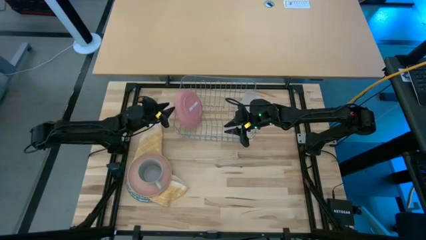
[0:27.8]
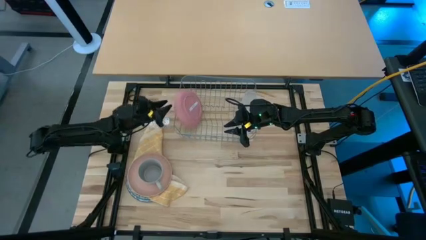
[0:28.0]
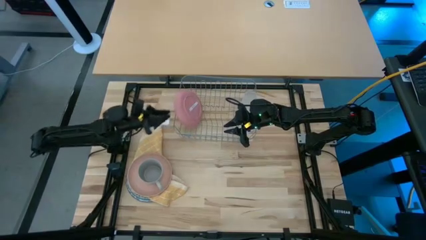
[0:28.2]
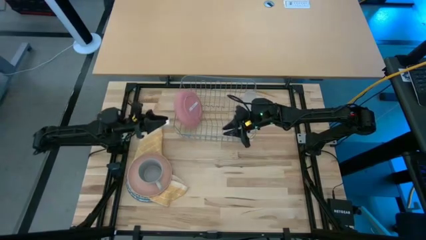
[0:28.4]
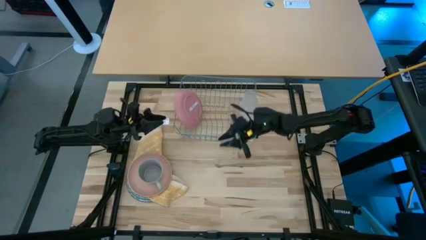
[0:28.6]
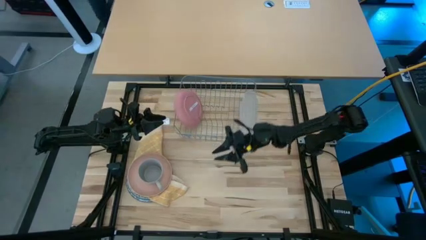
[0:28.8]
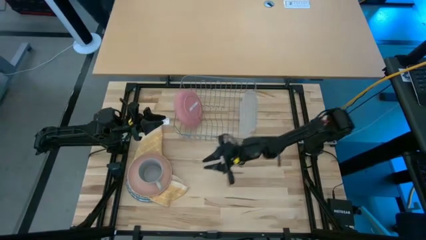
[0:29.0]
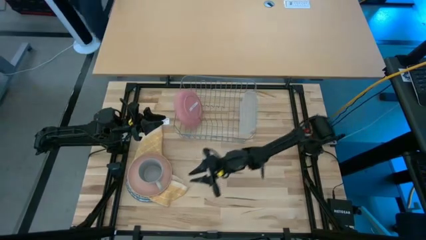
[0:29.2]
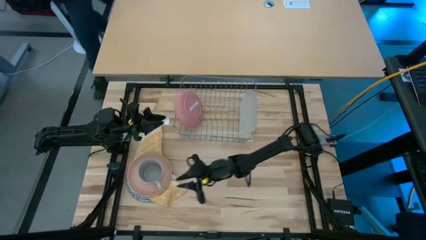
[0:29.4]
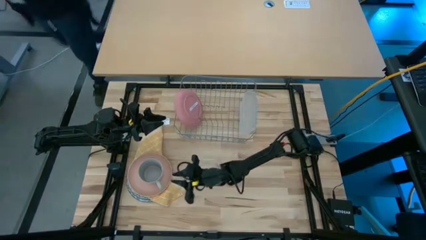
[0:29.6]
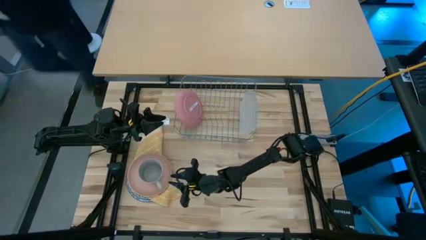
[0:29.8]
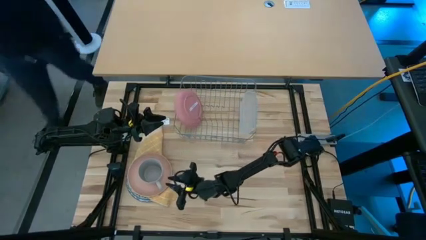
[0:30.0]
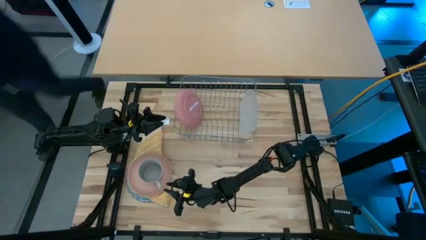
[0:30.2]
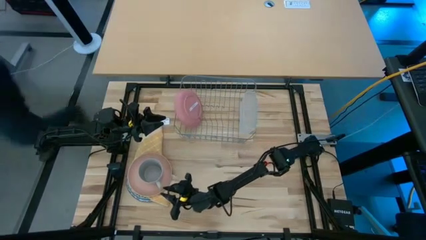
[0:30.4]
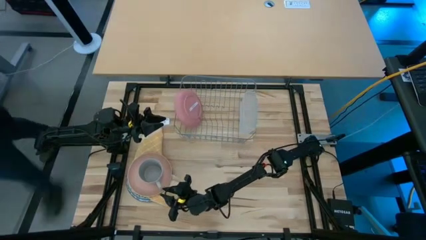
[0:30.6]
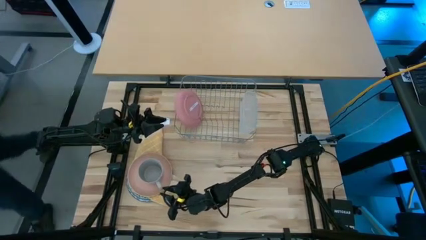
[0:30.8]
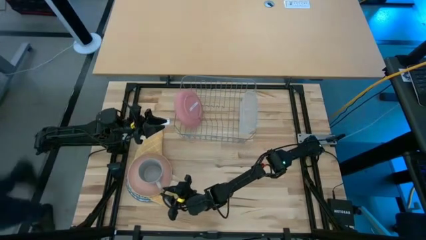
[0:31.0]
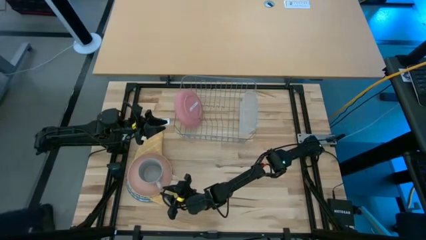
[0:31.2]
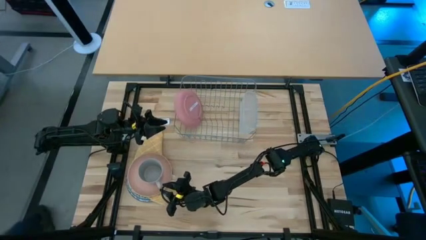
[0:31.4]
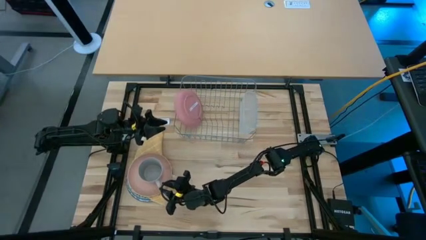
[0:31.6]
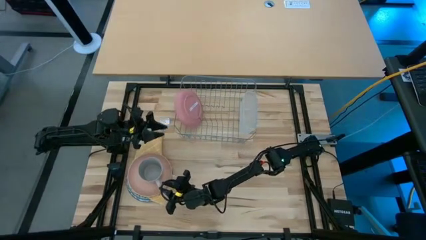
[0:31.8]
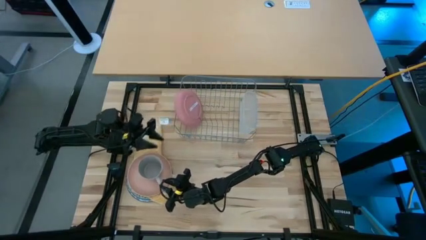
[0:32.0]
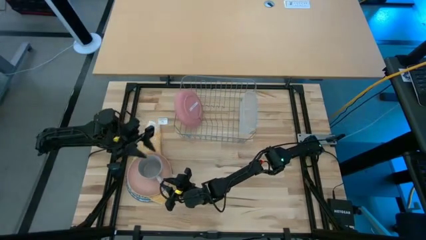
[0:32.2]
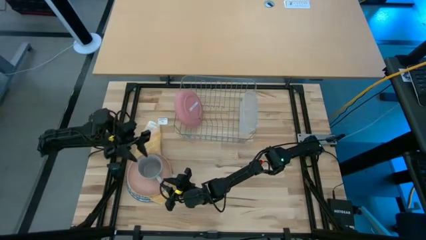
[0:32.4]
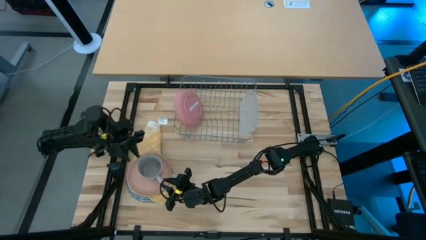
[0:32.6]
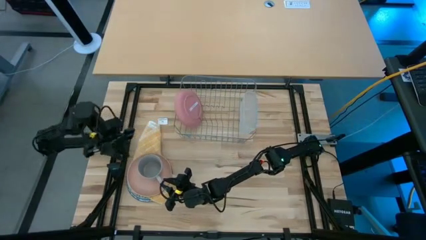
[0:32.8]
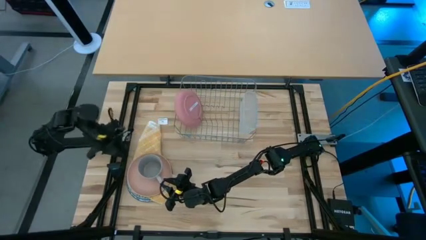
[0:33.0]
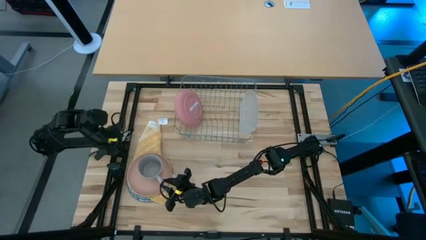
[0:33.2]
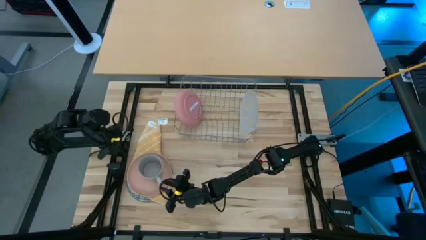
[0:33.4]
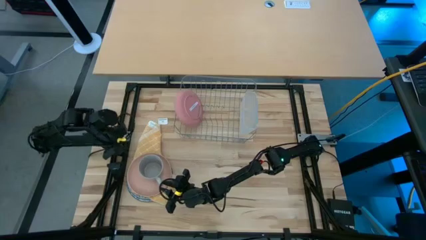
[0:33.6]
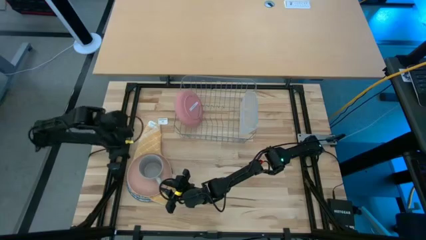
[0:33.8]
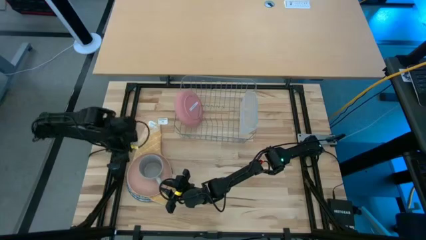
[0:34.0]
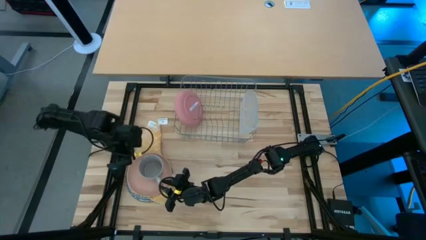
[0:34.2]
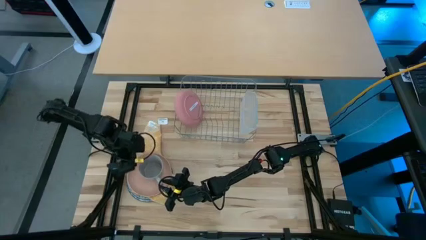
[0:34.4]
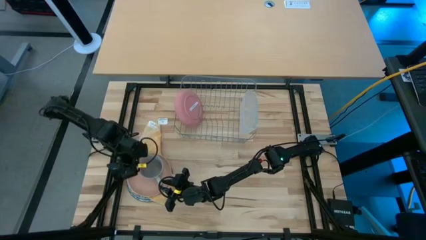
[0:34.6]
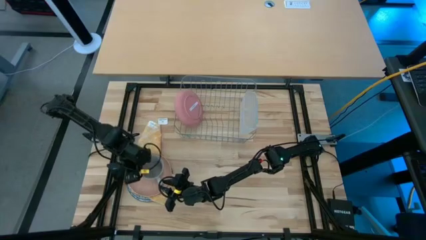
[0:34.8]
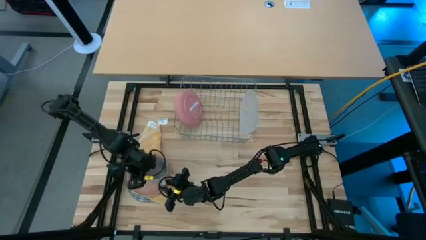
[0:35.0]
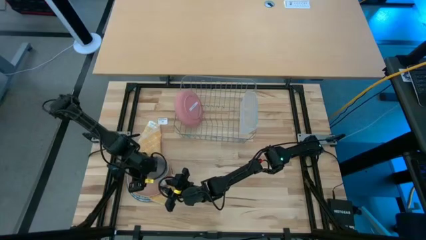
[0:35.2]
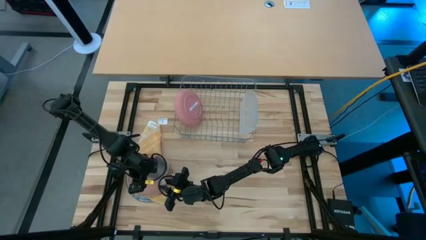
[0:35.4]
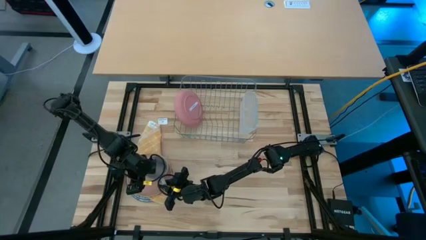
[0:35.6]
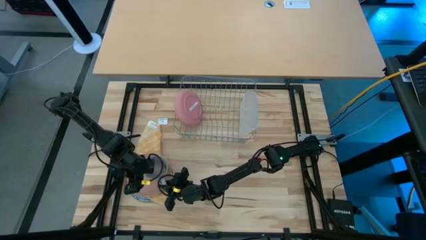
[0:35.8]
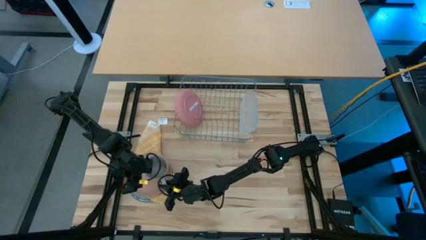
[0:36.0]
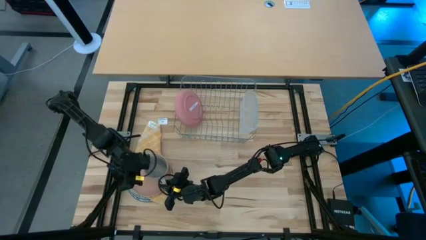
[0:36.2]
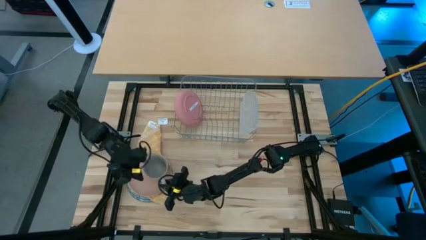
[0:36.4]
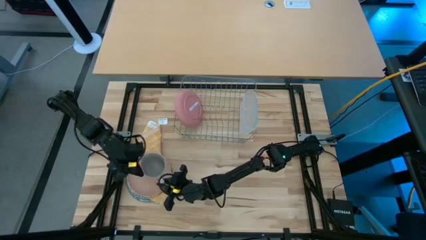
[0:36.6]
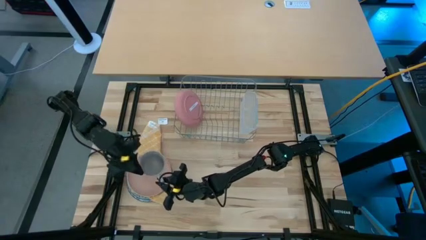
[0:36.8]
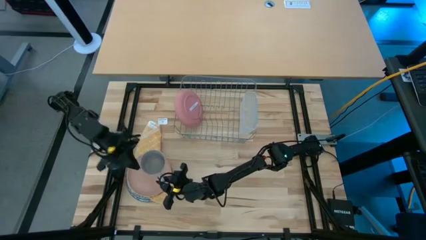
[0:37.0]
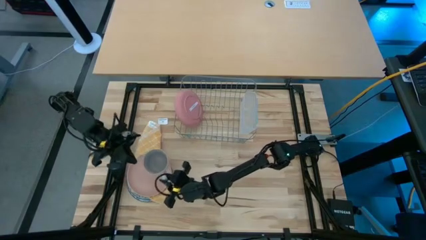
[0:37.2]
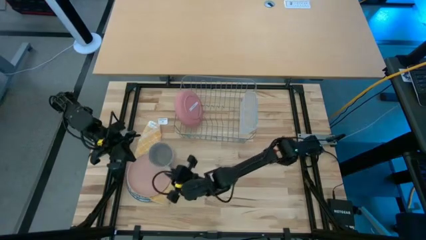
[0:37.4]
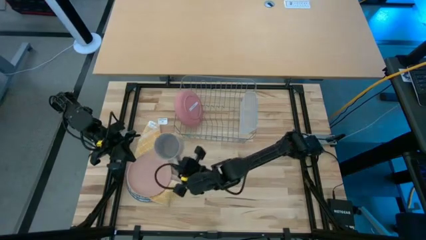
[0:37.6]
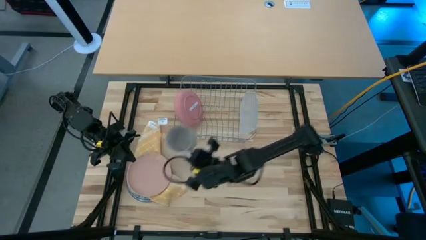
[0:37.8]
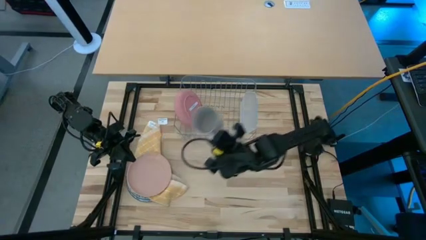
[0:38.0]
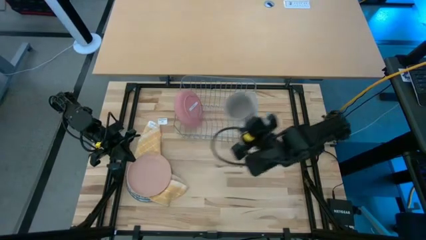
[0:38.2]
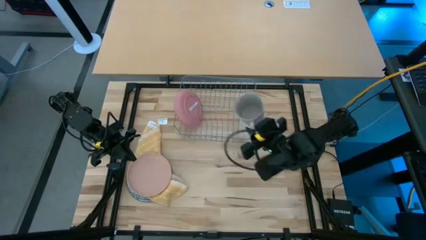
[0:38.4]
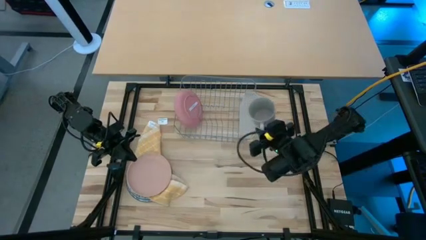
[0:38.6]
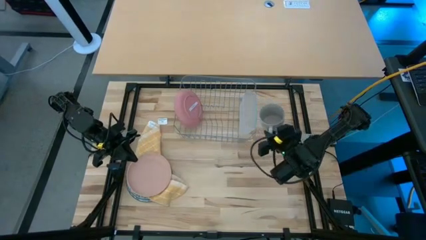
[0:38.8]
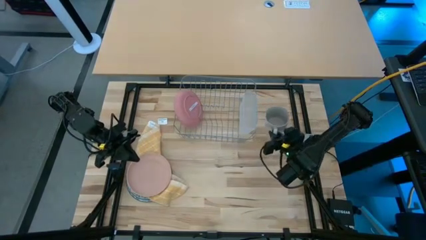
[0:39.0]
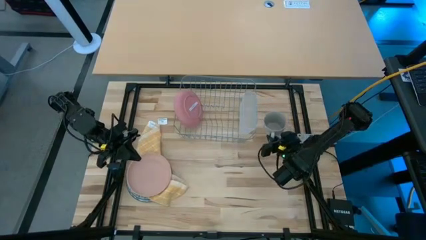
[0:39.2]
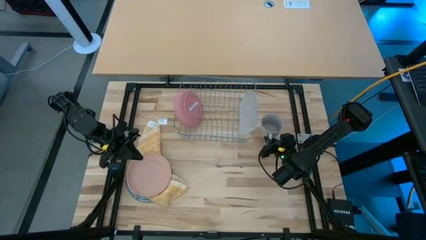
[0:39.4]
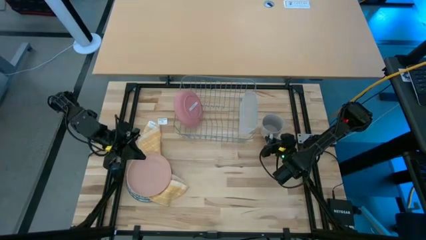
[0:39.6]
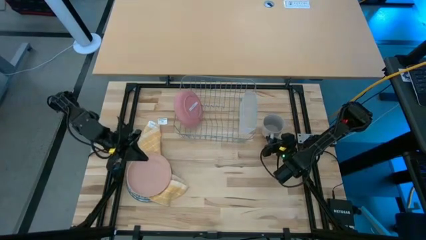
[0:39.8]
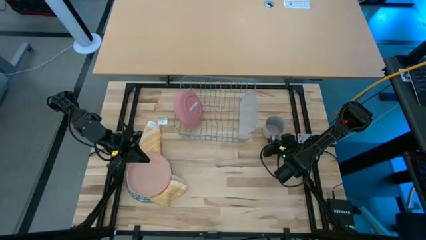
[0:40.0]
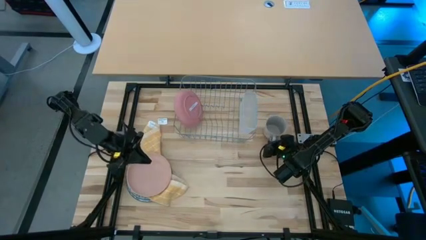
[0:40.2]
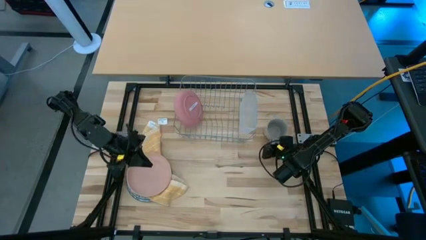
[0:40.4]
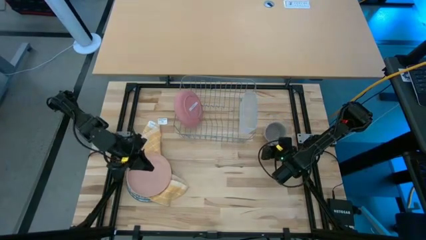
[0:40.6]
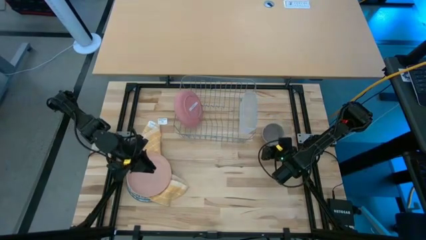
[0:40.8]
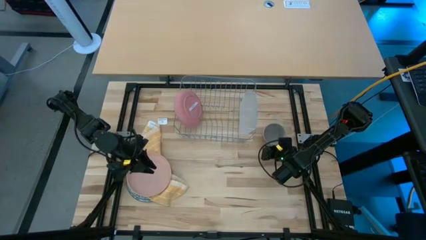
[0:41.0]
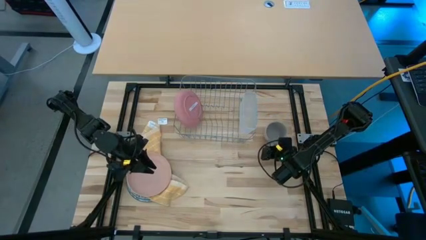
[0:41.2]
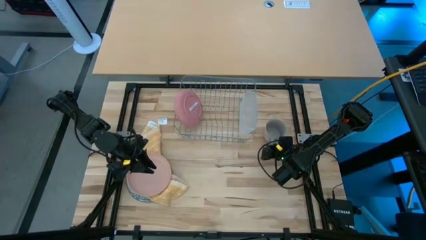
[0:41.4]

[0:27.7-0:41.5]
Task: Sort dishes
Put the gray cup to the right side of the table
